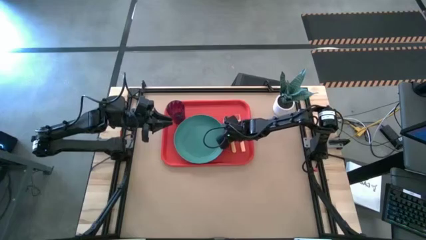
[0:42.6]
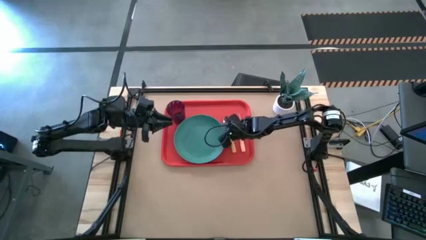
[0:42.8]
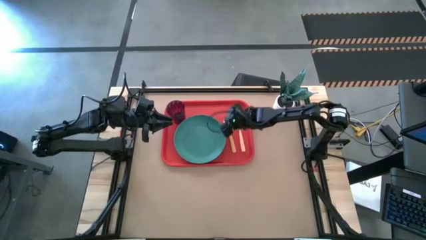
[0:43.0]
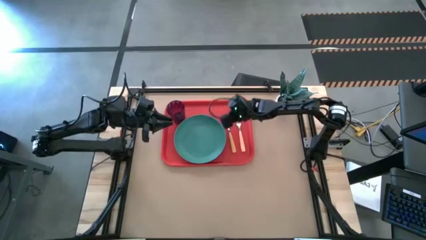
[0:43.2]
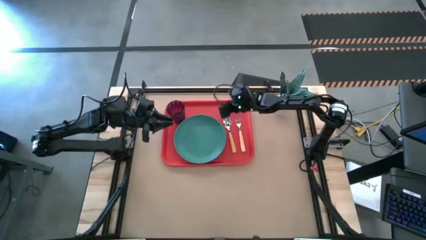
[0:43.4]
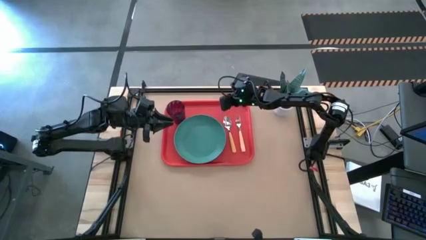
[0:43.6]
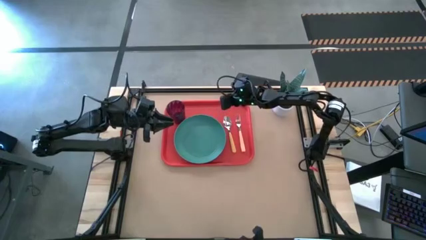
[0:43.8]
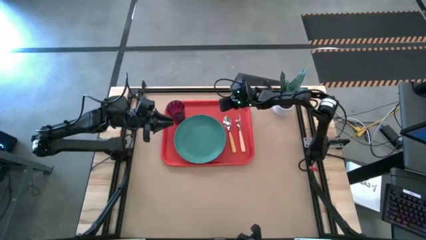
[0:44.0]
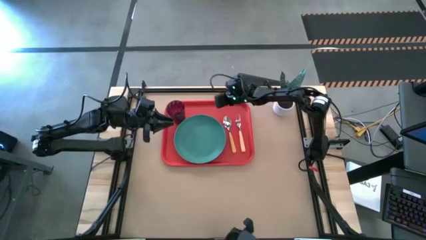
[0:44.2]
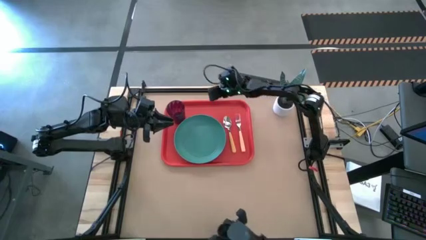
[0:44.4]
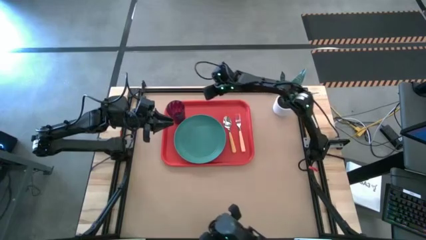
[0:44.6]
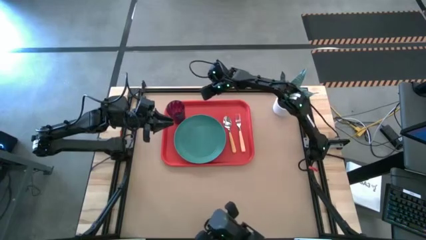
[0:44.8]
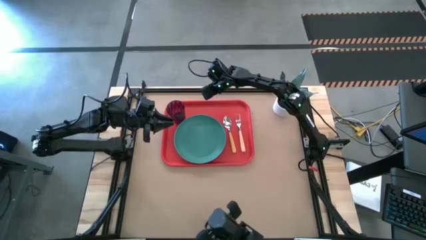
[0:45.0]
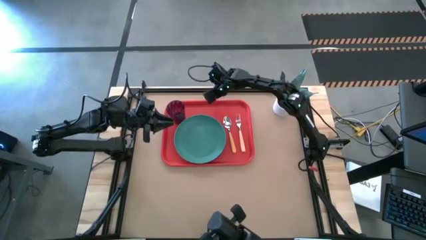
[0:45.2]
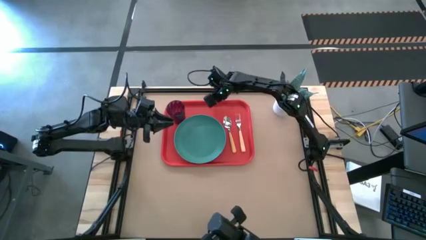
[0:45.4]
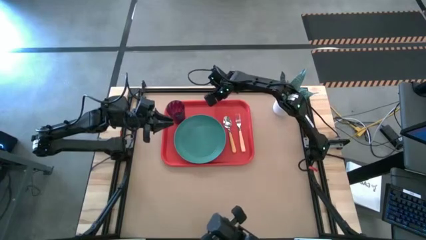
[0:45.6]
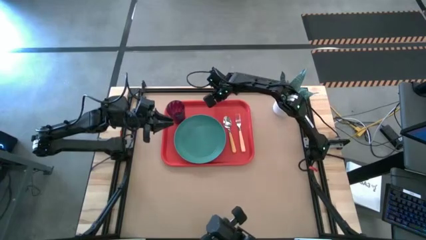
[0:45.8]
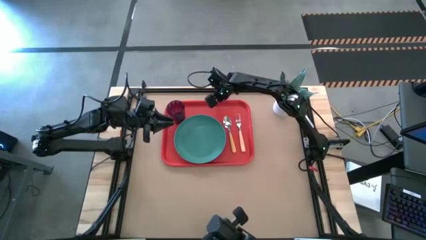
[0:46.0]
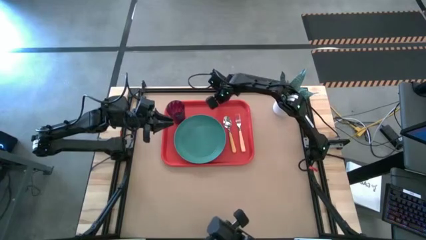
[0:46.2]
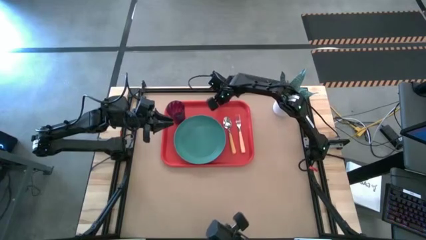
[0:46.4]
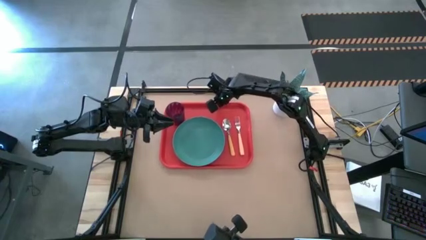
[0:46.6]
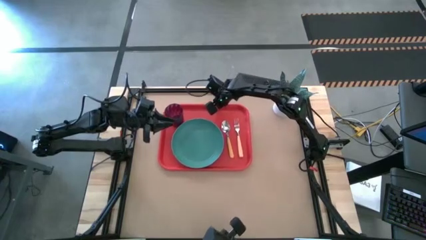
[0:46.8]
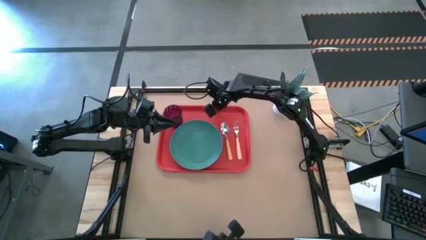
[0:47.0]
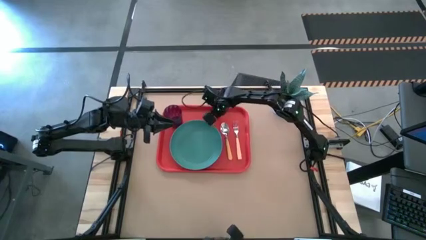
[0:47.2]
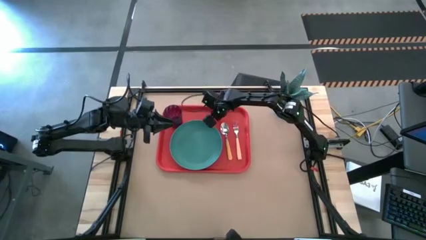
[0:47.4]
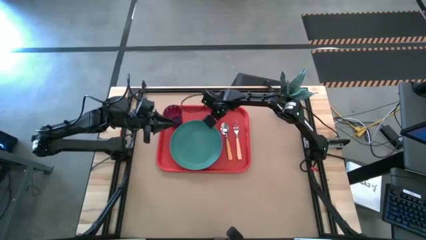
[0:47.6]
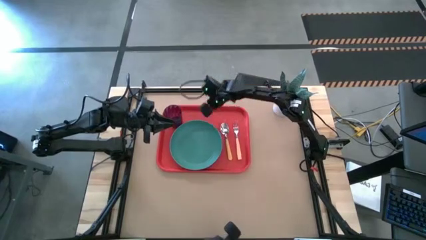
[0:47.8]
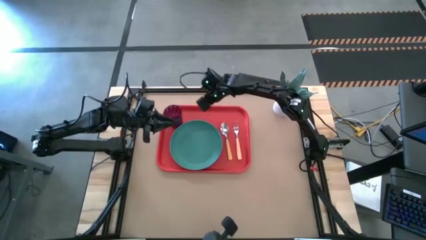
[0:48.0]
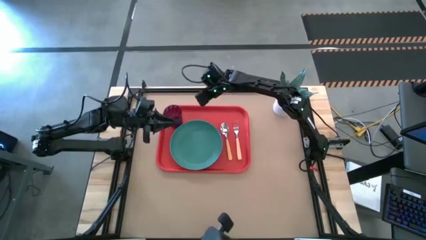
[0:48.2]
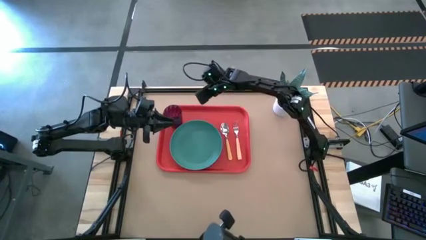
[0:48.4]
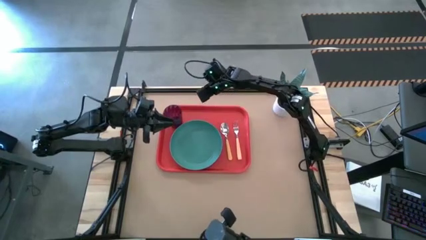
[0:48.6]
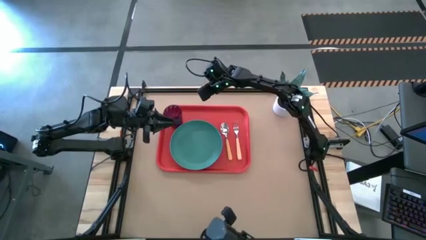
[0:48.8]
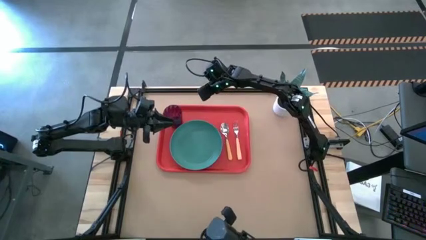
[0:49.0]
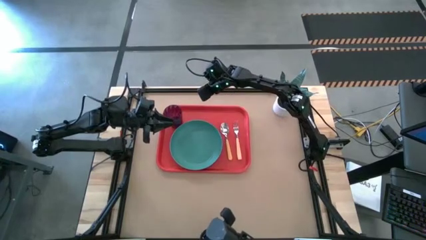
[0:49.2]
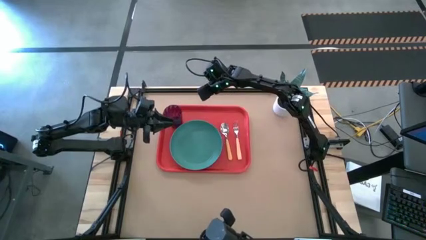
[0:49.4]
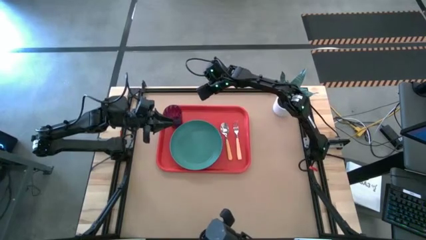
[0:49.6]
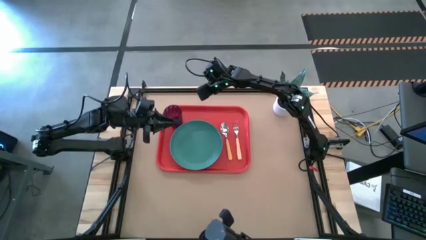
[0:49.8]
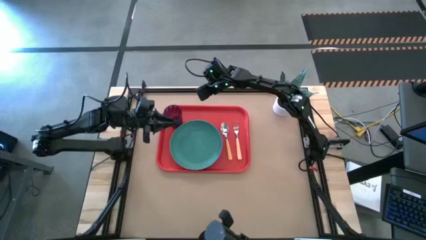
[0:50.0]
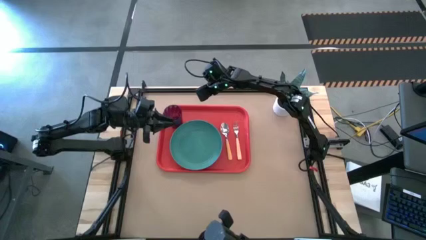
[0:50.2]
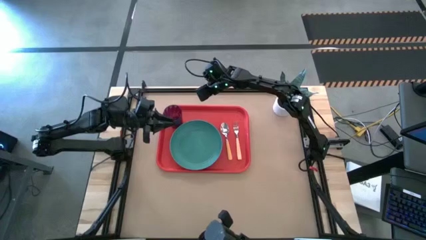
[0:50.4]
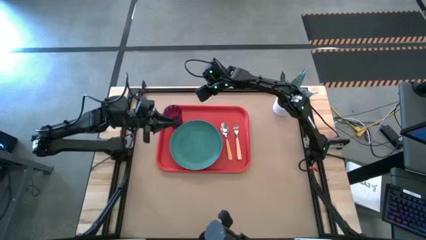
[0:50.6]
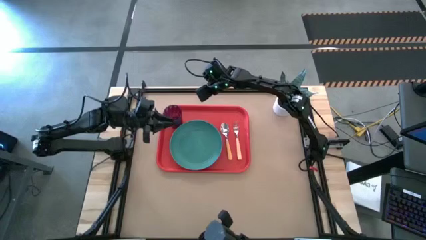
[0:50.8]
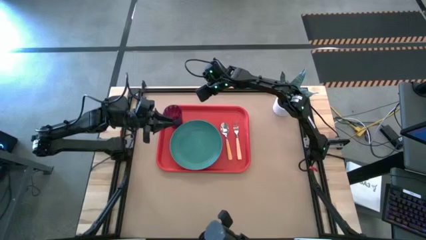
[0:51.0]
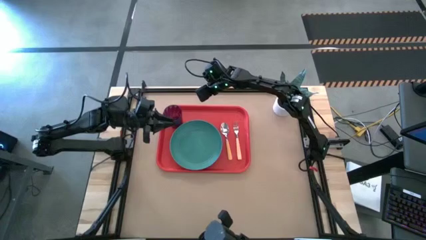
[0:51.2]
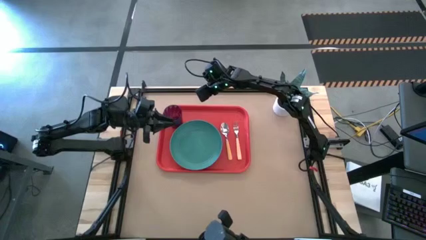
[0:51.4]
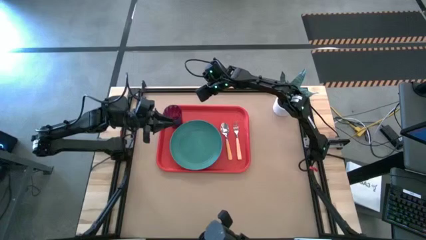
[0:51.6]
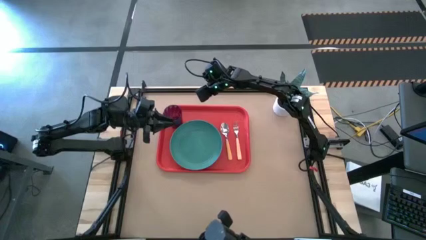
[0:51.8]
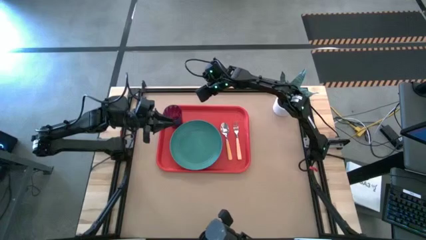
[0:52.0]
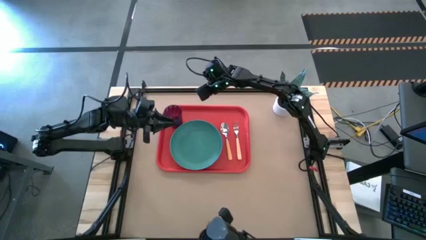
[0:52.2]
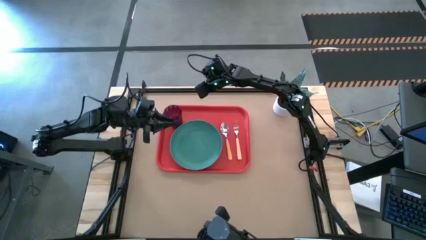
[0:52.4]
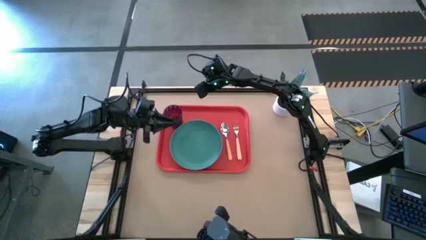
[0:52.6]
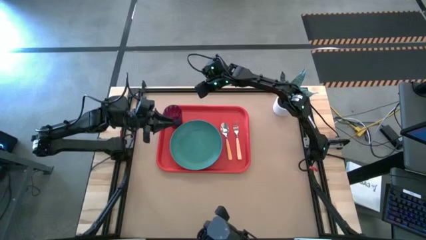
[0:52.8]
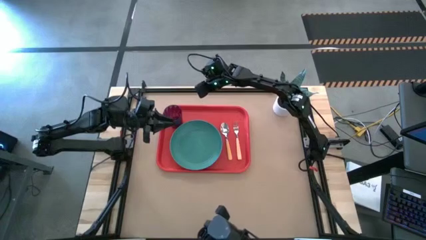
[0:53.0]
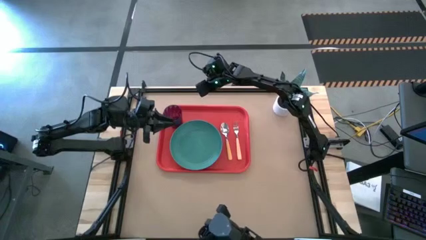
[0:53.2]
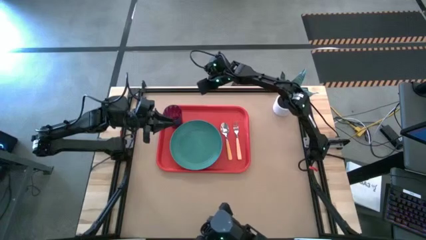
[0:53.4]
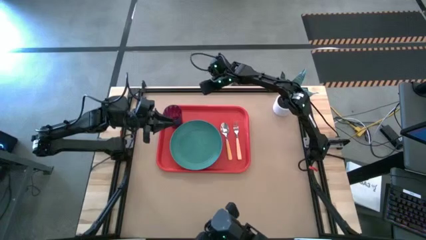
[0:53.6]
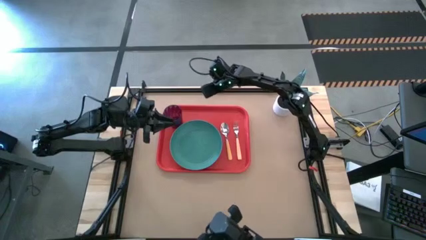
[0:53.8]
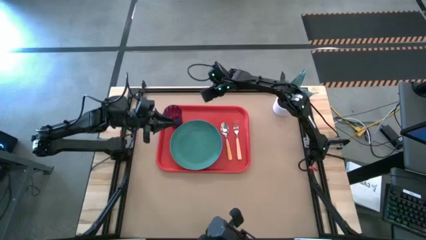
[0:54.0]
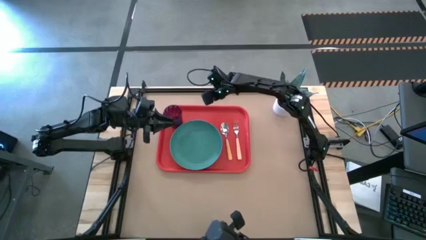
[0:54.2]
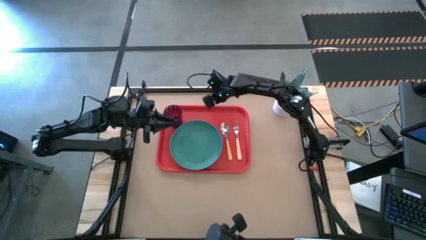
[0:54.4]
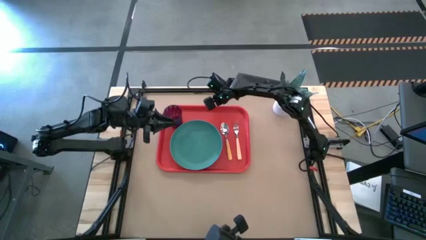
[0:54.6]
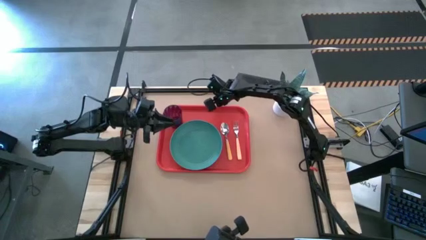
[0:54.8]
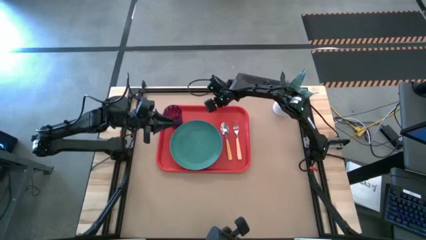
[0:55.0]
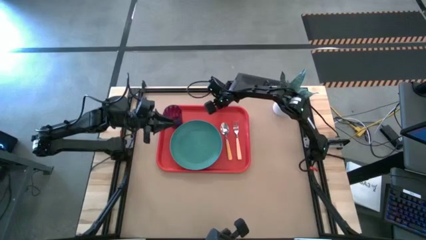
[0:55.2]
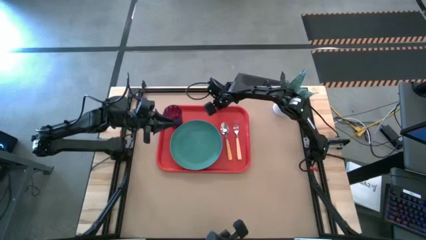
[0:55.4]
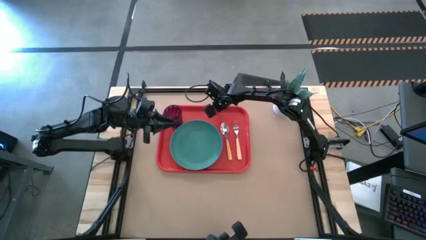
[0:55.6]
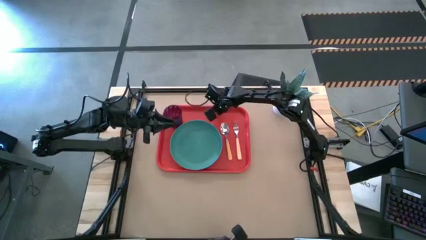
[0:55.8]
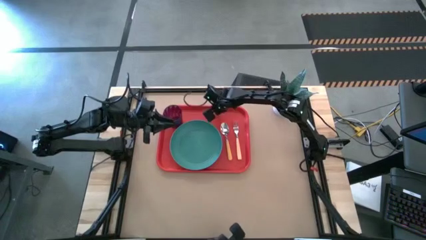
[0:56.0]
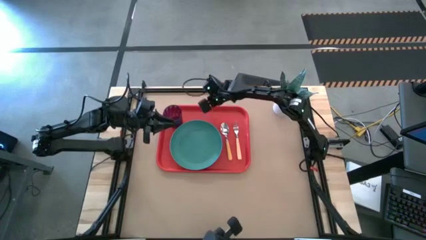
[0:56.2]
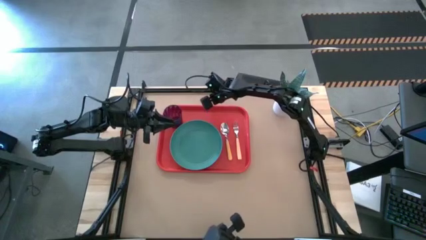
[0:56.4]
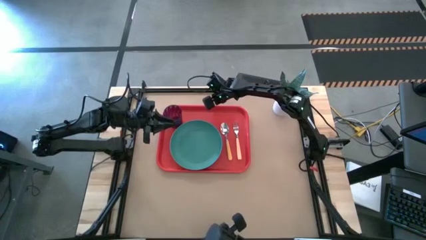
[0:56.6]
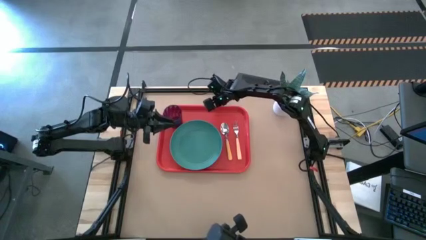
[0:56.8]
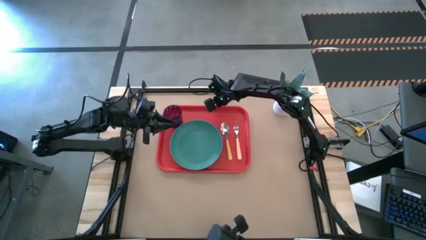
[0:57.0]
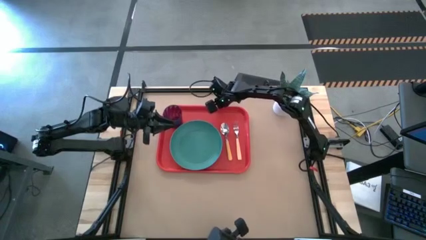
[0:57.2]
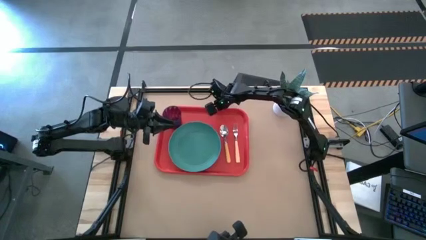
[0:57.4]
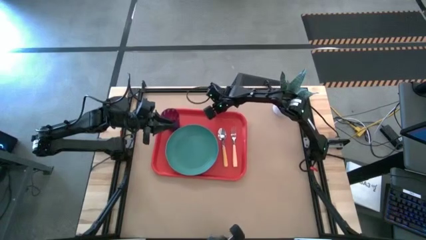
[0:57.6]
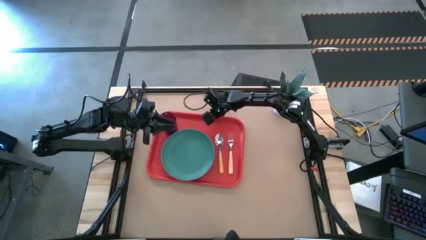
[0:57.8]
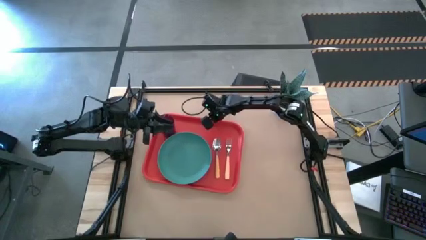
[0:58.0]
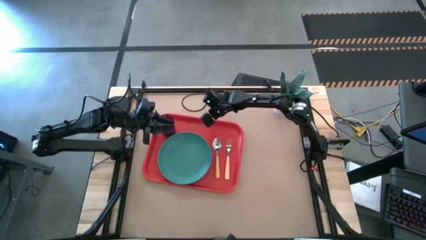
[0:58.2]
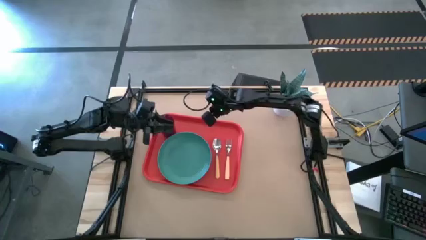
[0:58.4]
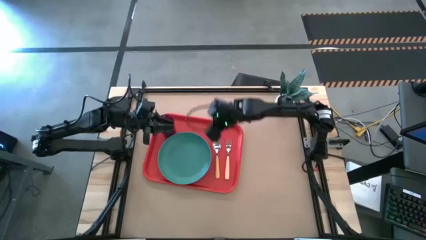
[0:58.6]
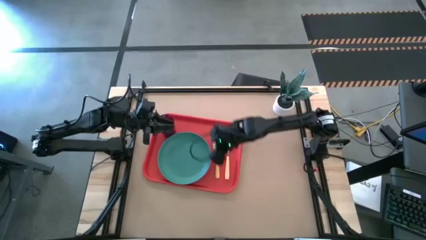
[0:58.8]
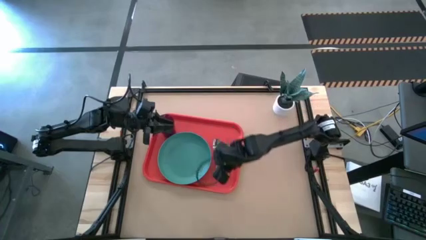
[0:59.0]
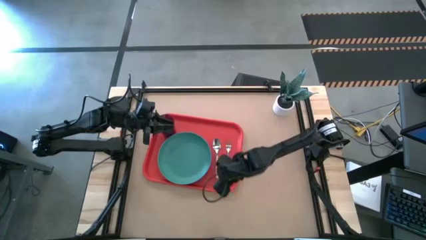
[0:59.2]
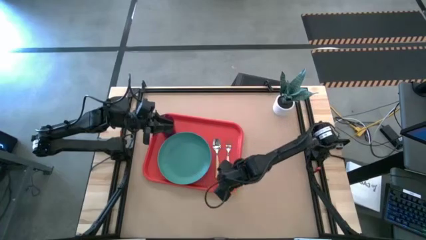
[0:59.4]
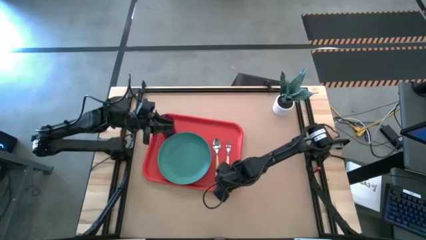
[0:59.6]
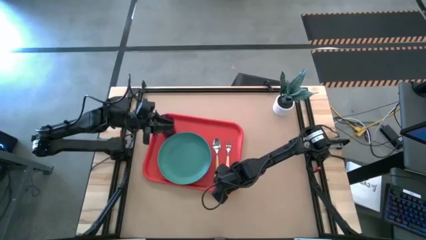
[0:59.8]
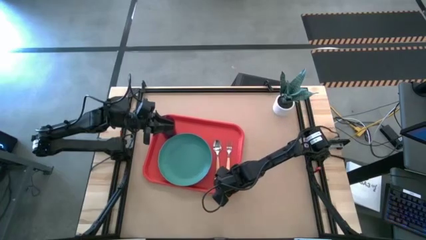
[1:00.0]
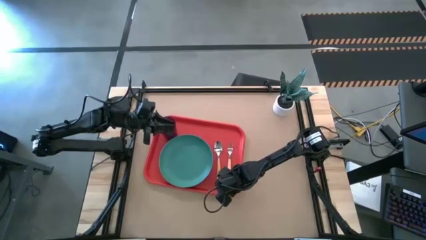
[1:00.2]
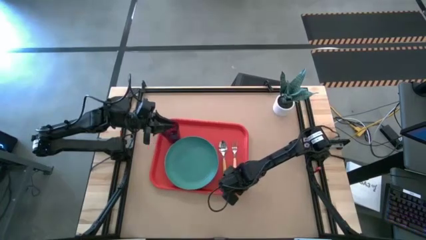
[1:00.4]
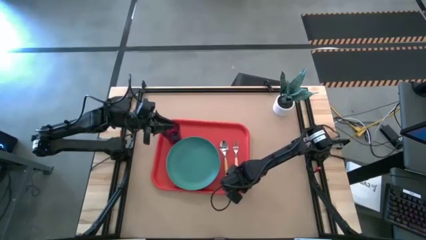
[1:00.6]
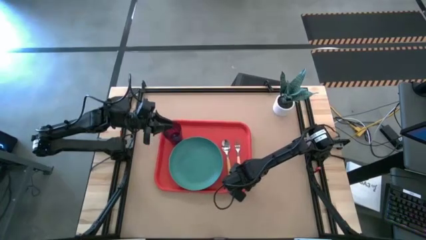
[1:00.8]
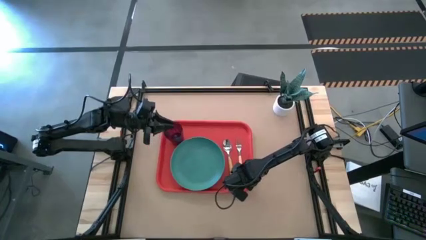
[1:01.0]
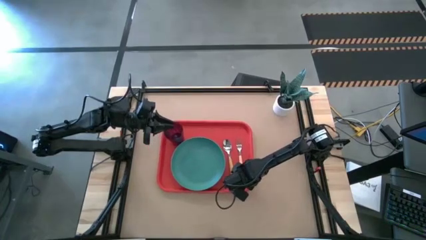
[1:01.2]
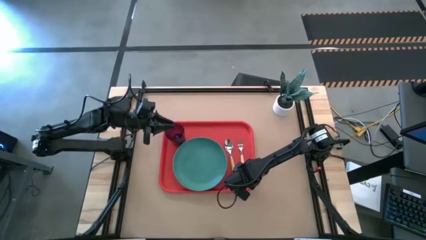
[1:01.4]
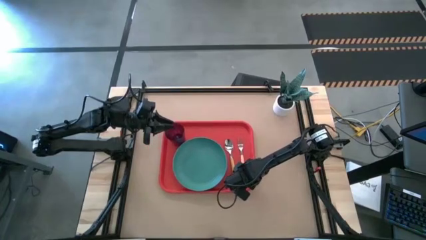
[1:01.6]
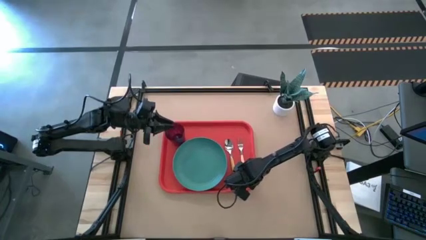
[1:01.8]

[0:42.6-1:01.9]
Task: Pick and place plate/cup/fork/spoon on tray
Move the red tray to the center of the table
